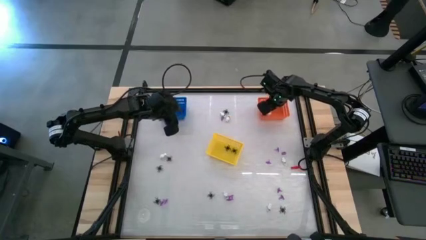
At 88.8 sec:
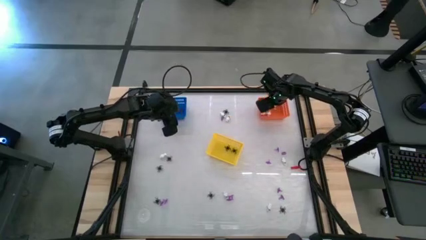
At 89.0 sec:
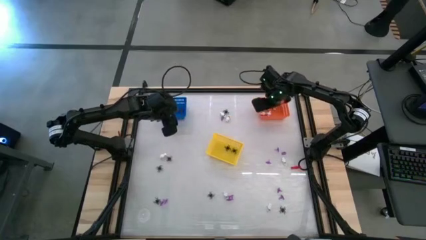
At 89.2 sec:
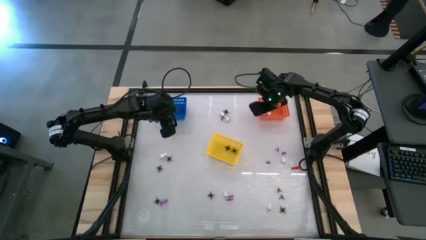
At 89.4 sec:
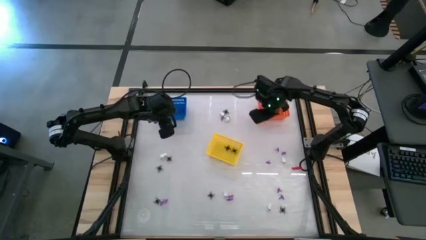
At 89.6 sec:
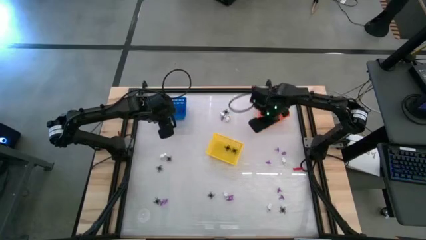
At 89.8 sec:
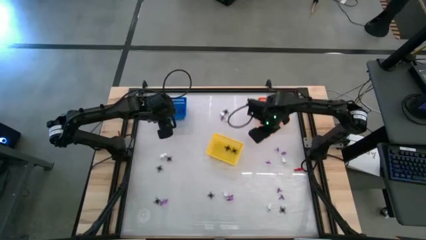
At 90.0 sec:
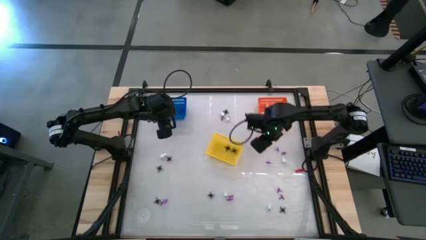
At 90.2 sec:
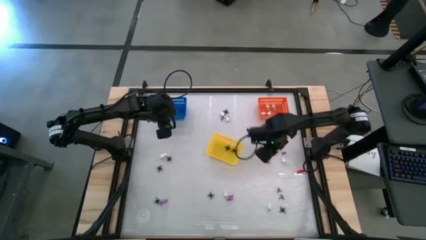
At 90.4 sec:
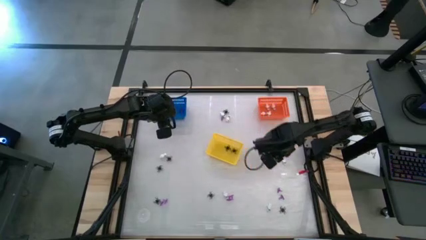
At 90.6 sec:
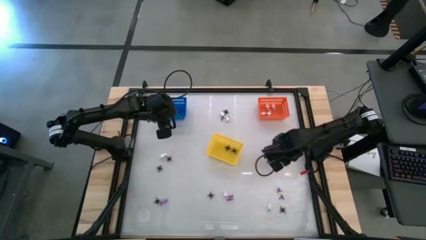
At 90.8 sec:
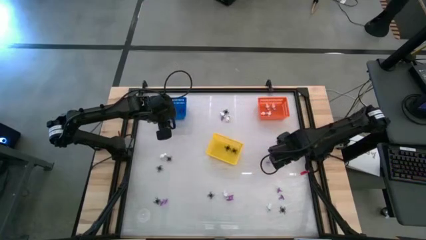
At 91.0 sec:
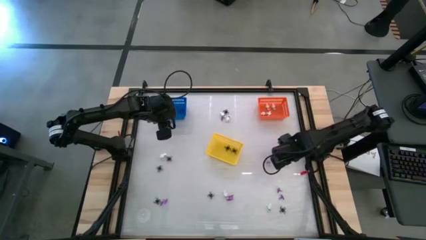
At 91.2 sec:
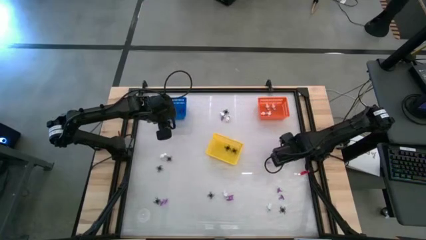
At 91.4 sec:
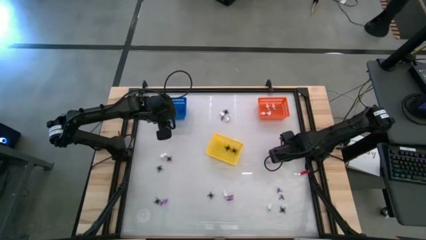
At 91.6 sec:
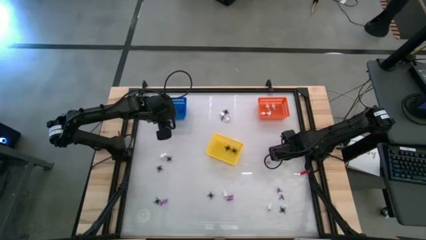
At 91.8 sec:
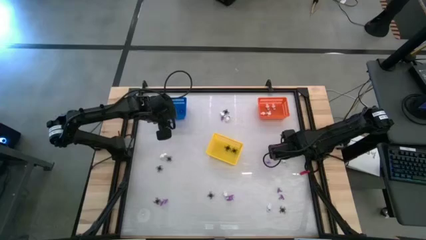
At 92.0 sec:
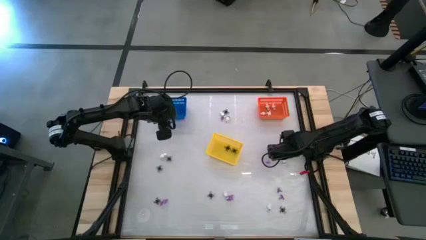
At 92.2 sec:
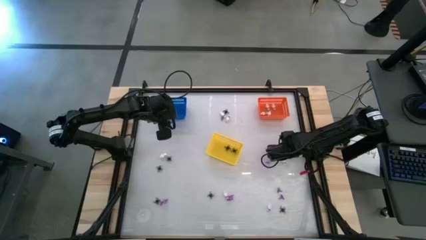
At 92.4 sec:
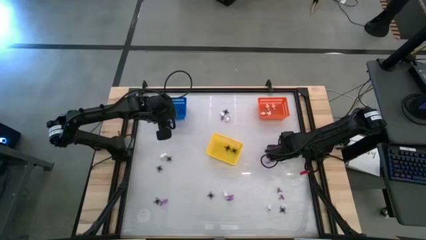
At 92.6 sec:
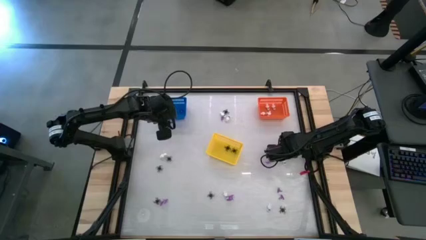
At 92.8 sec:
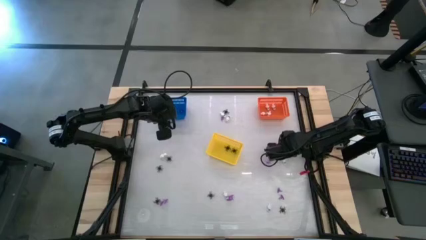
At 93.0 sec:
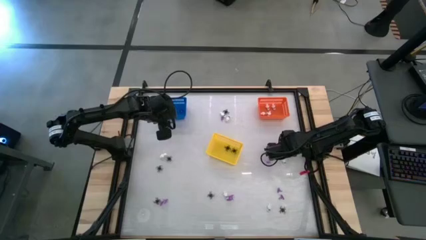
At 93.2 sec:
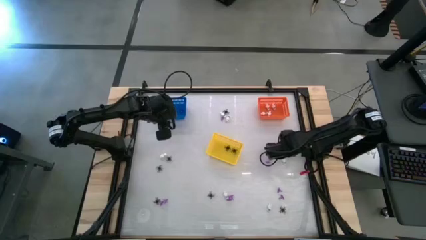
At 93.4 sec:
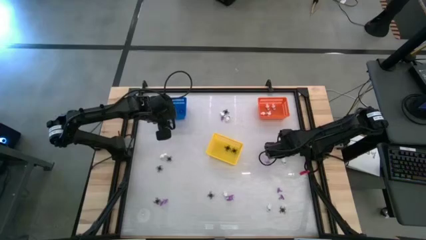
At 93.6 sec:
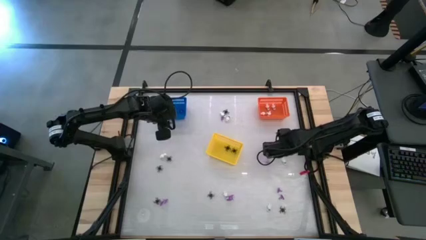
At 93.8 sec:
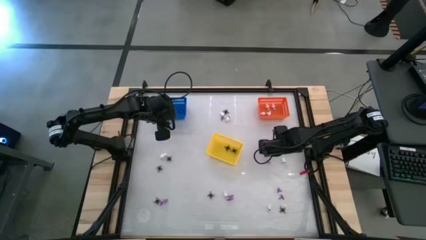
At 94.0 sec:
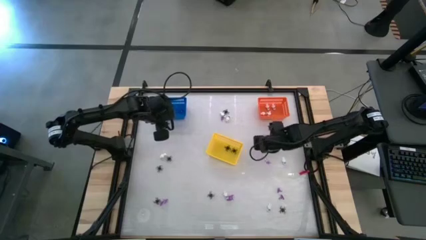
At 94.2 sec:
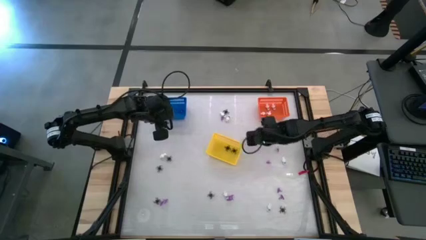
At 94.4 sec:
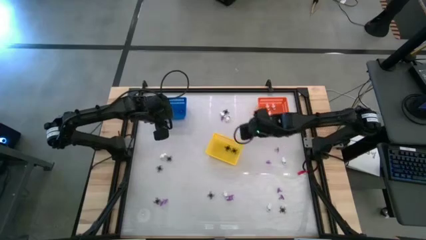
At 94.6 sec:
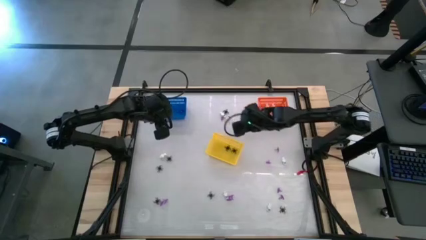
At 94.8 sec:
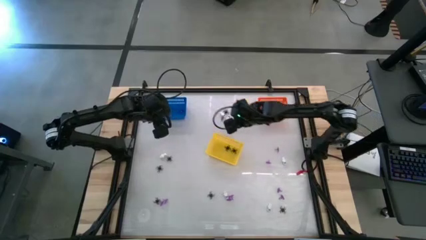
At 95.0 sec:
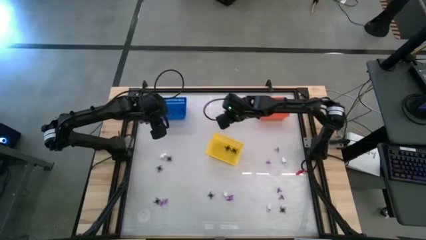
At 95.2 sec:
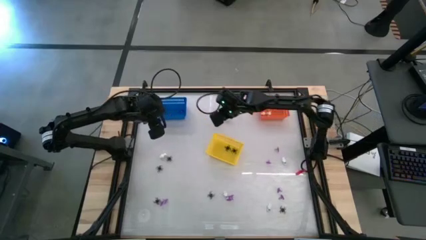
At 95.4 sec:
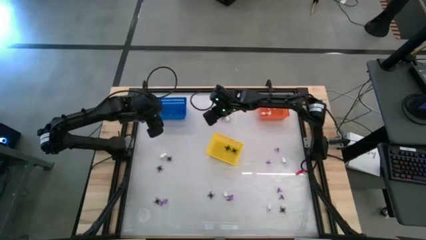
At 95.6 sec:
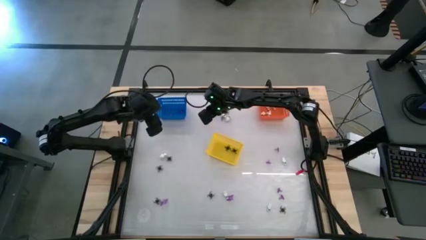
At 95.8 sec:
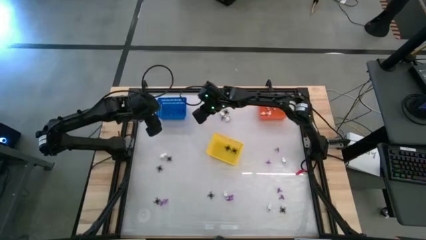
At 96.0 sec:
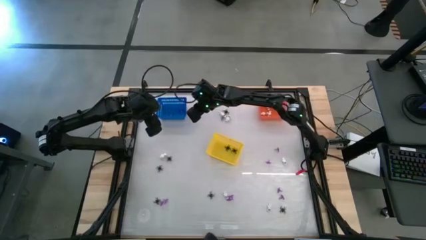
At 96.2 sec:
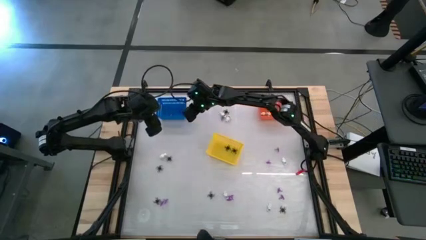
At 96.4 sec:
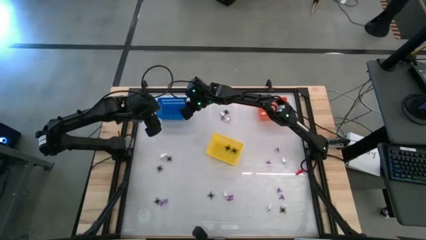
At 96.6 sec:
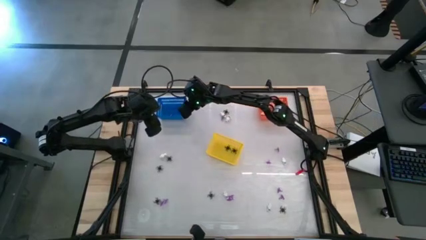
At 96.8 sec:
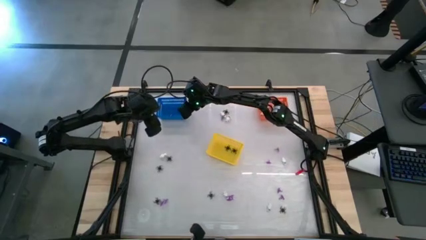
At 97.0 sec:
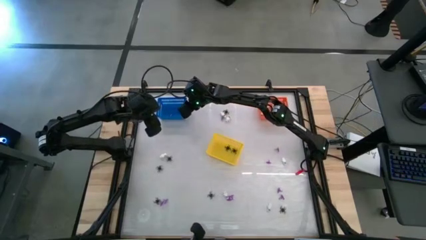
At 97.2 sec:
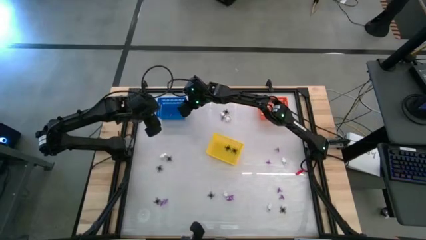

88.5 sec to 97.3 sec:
Task: Sort Halloween decoration
Put the purple witch hat toy into the blue bin

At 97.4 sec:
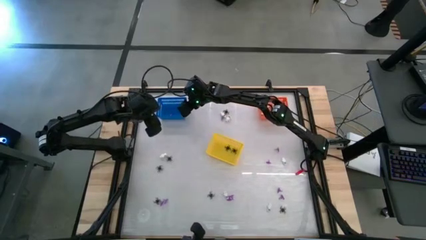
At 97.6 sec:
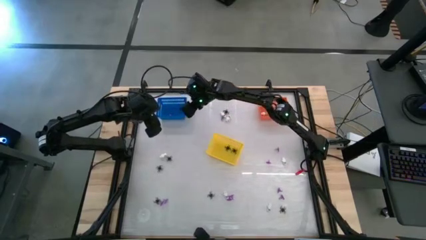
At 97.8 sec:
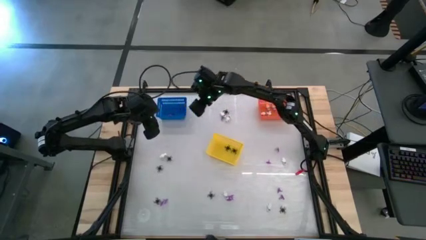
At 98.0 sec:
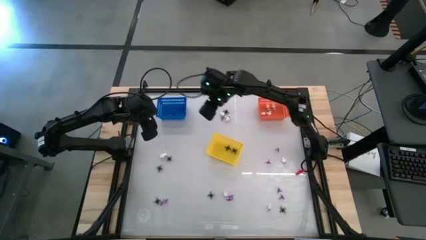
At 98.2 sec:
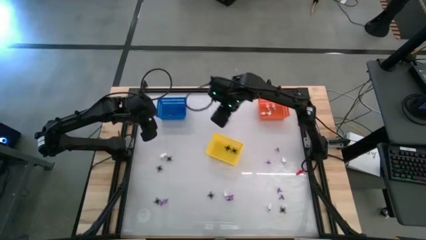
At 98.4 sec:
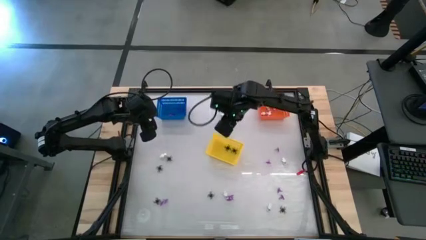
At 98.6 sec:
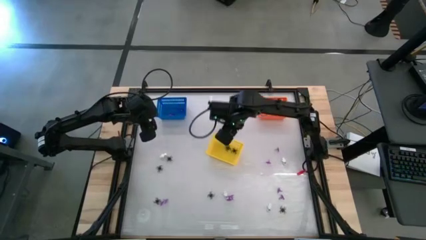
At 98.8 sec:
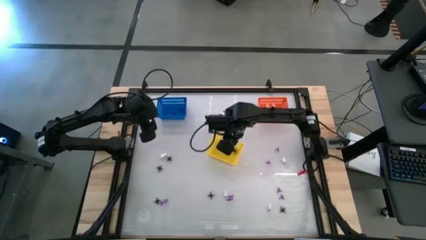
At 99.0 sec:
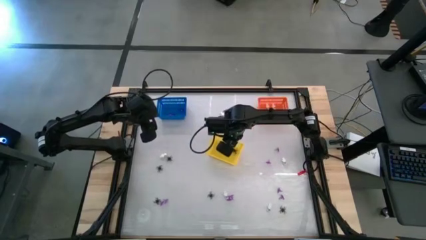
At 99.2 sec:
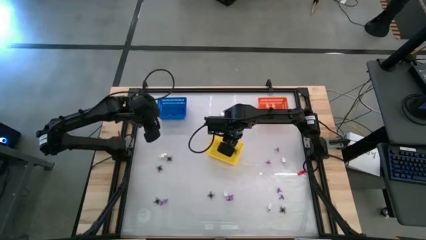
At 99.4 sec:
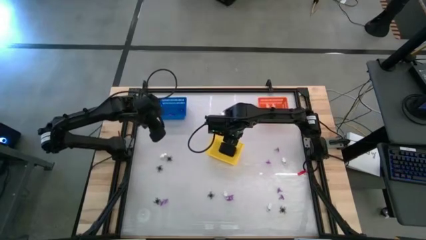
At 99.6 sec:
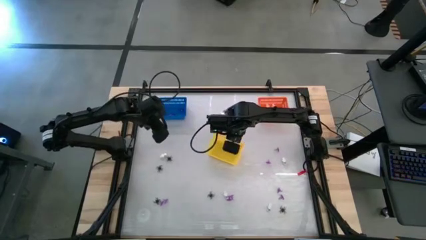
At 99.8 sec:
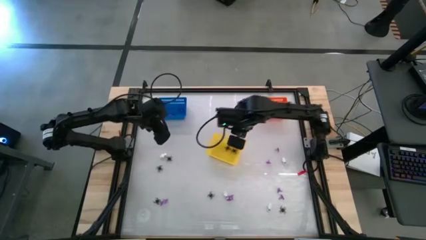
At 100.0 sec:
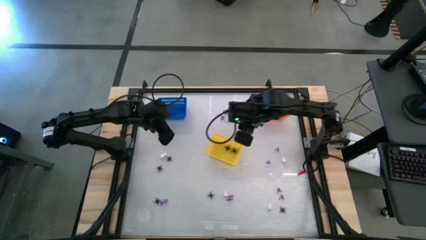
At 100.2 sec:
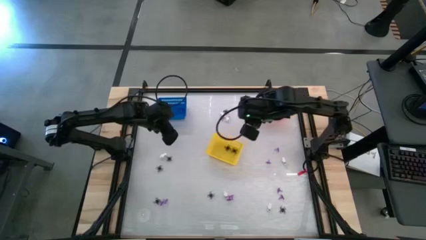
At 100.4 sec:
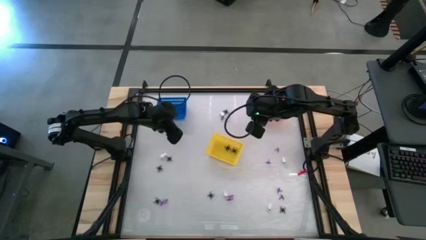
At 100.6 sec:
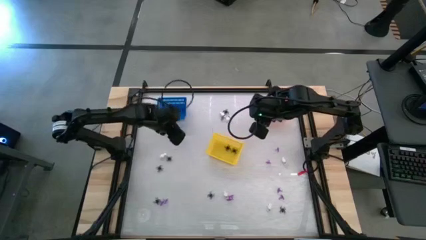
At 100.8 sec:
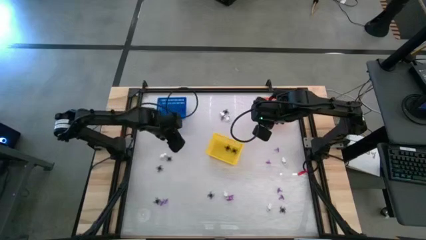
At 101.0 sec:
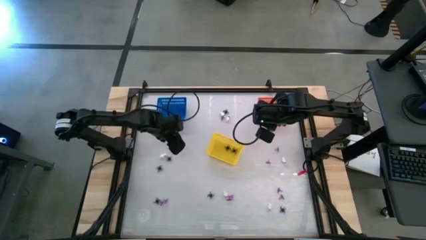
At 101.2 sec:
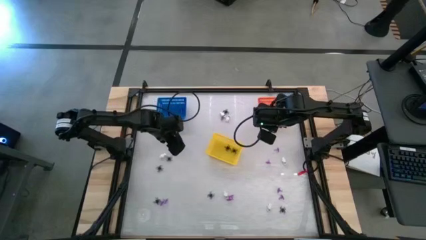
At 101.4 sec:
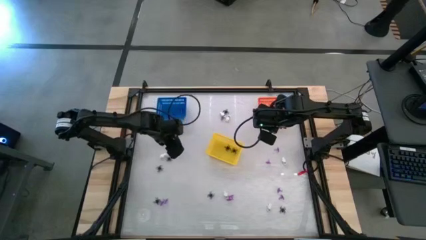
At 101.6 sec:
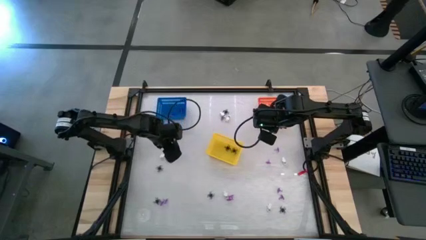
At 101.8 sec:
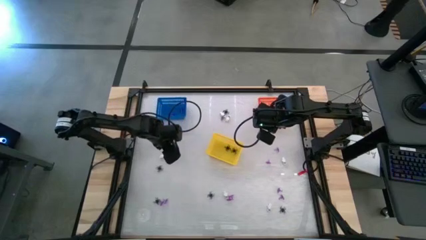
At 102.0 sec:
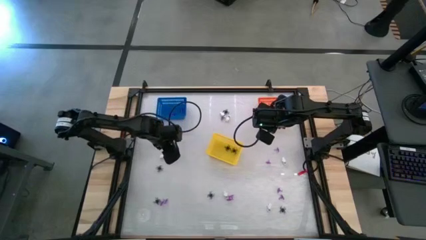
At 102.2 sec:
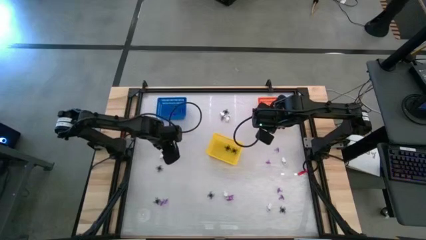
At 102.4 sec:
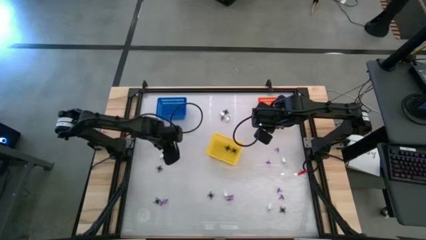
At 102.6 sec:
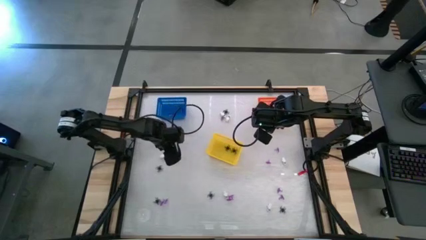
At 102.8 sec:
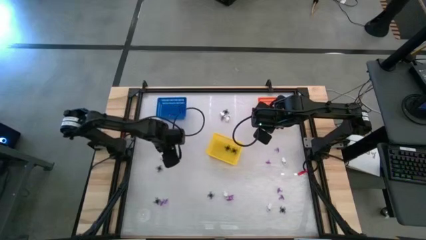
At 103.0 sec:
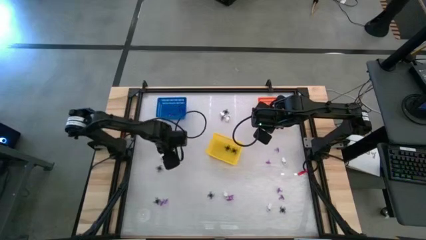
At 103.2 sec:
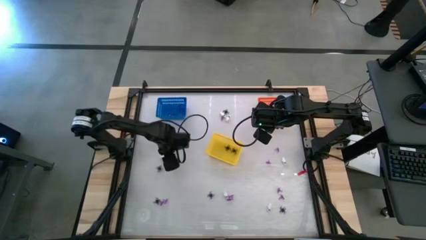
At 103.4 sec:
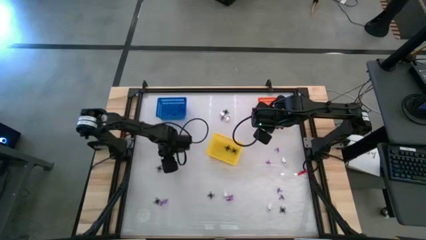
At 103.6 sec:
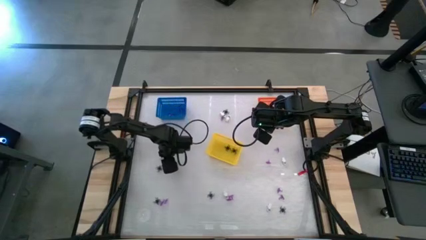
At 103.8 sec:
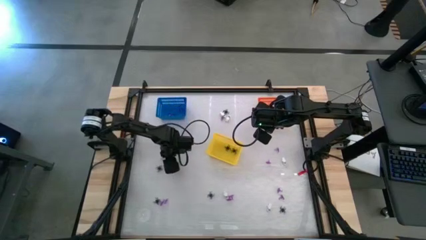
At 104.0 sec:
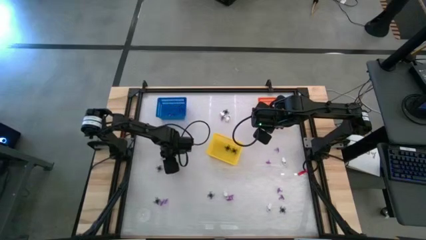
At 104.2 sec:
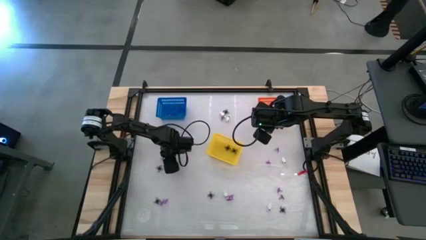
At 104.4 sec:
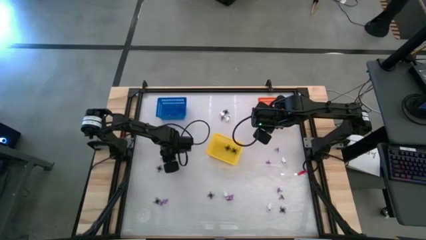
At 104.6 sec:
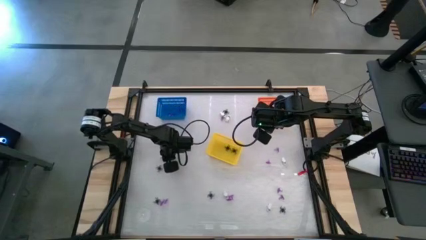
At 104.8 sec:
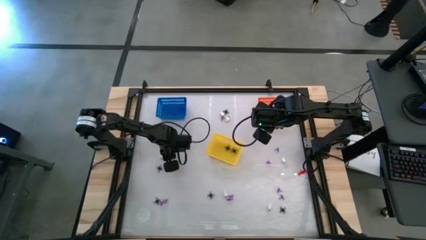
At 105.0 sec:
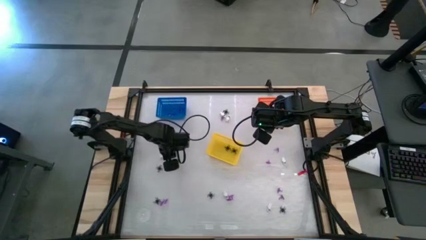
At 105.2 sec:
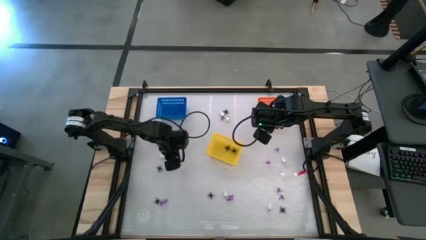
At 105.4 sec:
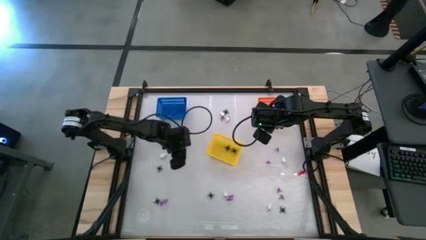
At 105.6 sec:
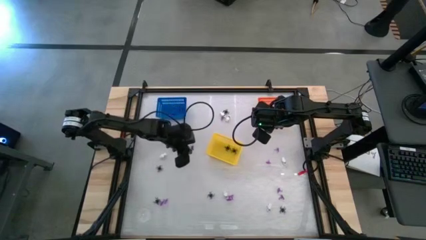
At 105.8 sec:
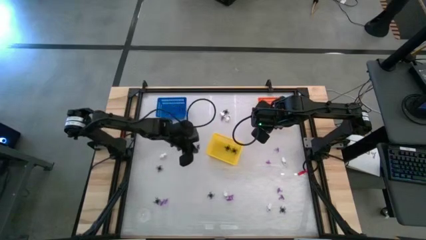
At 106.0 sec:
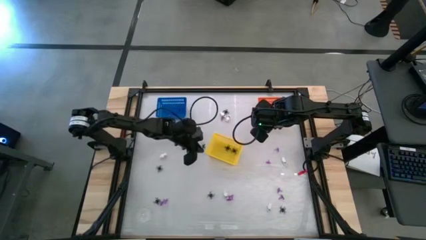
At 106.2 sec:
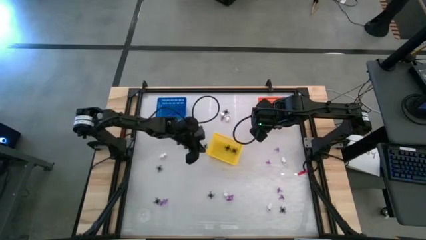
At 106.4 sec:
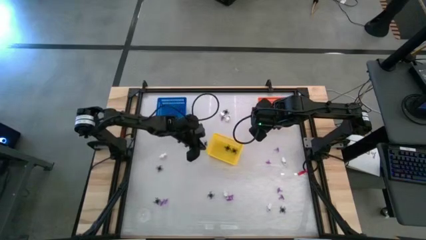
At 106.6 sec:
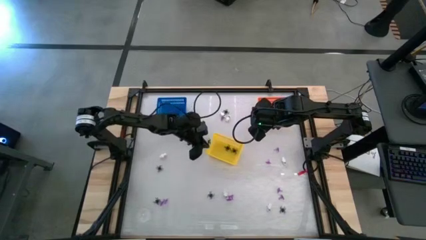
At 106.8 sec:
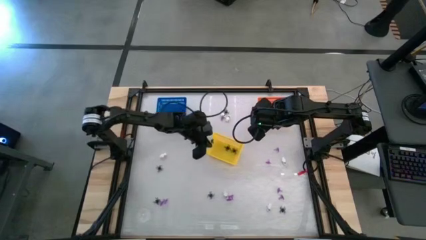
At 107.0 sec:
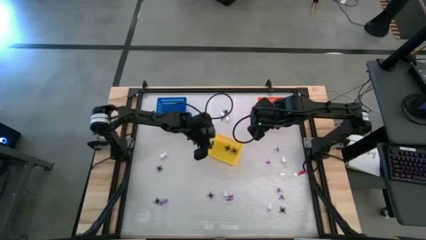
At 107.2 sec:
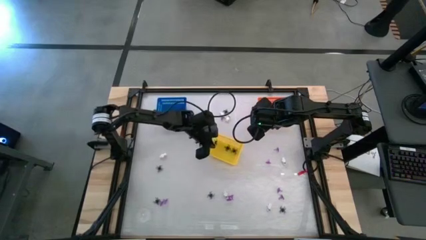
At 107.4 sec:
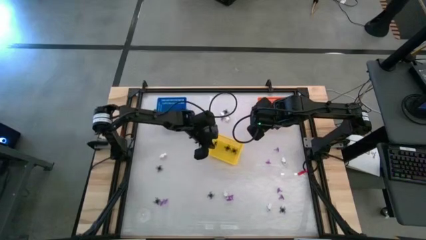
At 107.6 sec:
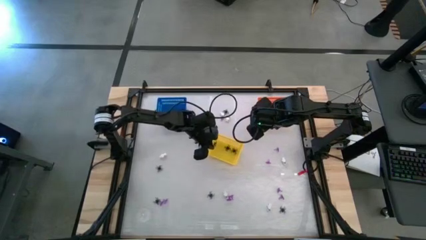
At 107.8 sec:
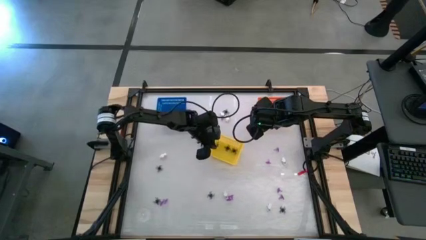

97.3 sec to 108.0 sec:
Put the black spider toy into the yellow bin
